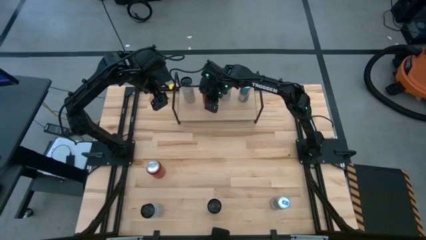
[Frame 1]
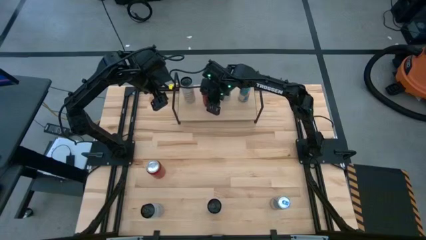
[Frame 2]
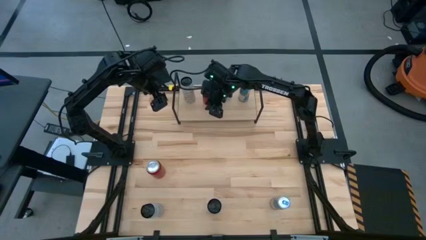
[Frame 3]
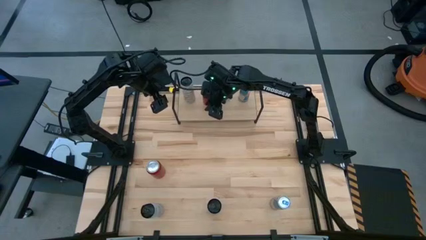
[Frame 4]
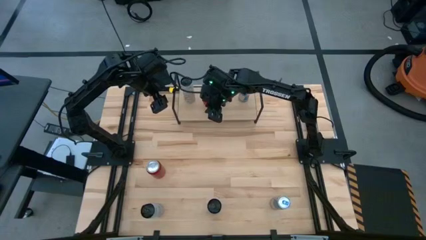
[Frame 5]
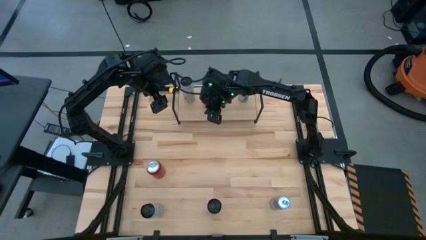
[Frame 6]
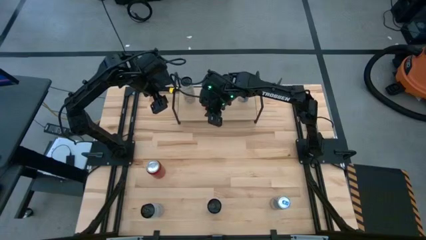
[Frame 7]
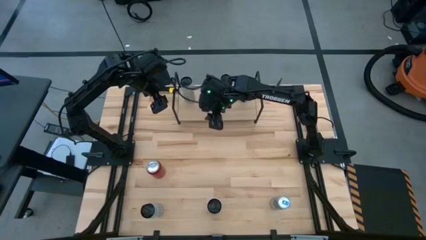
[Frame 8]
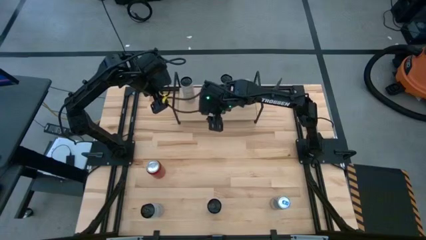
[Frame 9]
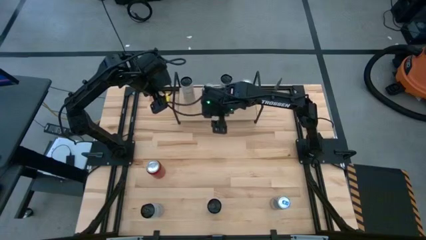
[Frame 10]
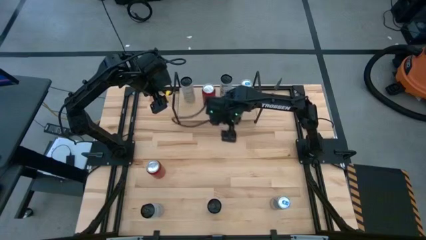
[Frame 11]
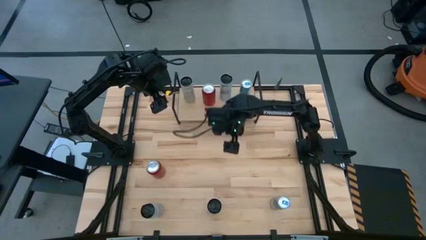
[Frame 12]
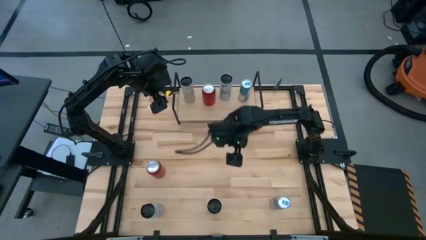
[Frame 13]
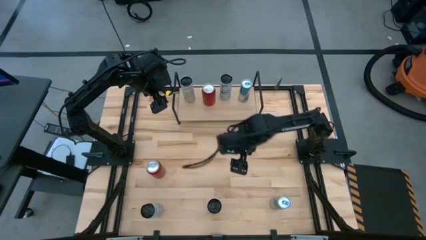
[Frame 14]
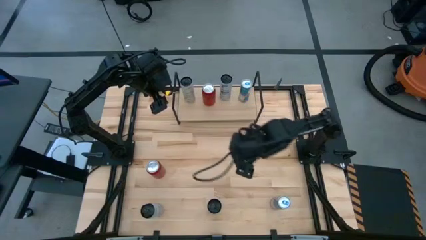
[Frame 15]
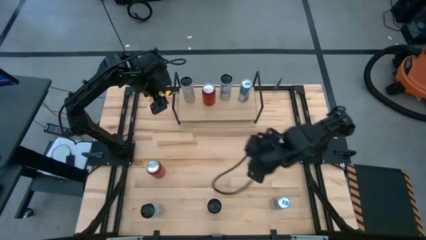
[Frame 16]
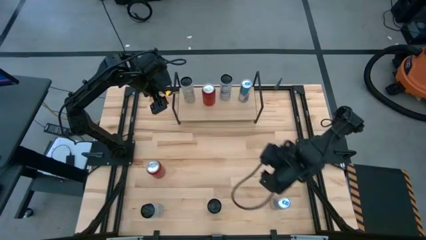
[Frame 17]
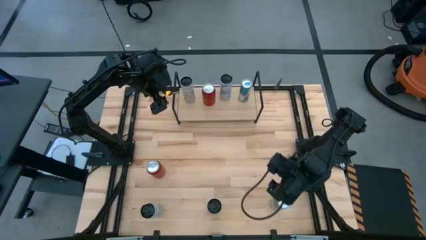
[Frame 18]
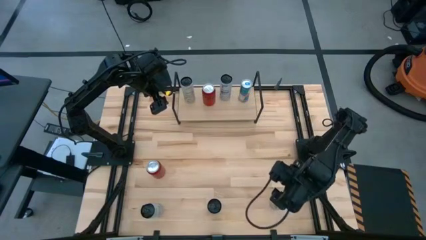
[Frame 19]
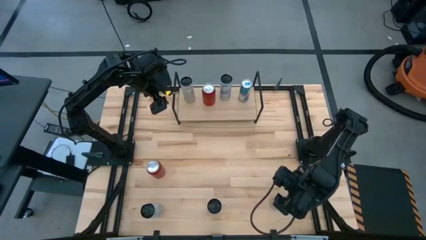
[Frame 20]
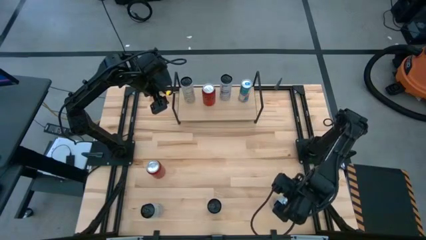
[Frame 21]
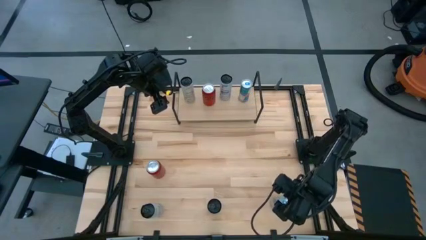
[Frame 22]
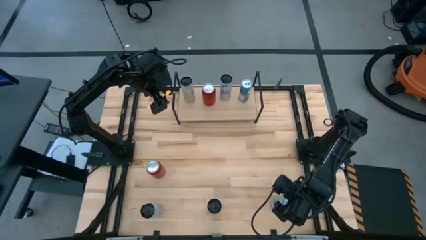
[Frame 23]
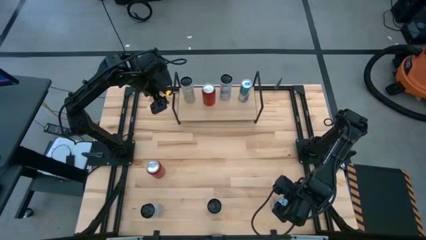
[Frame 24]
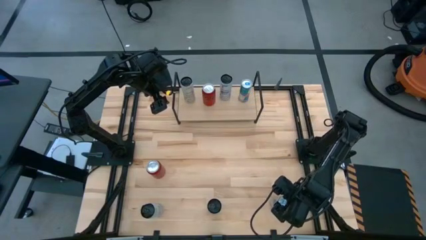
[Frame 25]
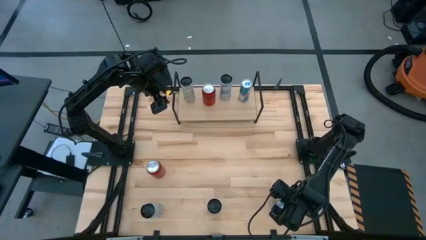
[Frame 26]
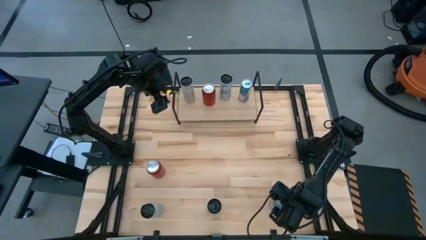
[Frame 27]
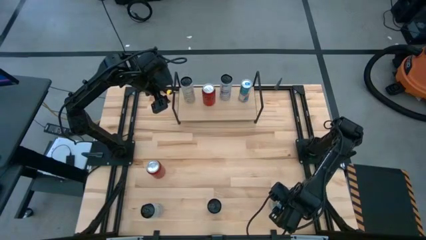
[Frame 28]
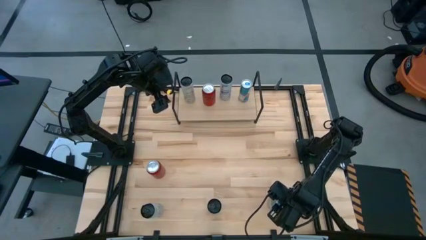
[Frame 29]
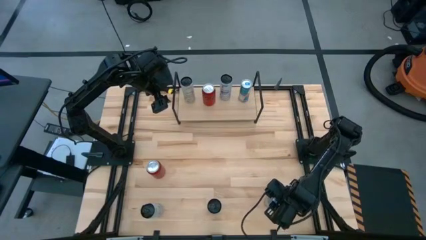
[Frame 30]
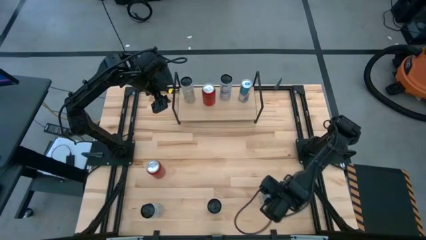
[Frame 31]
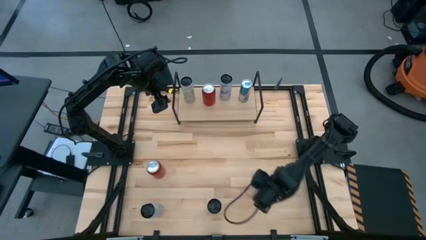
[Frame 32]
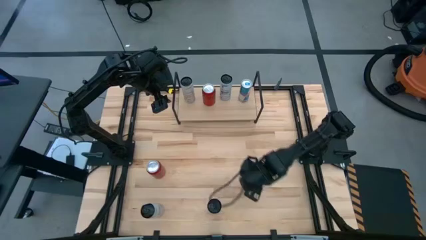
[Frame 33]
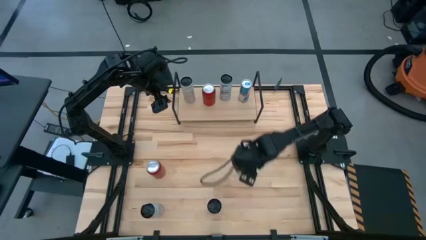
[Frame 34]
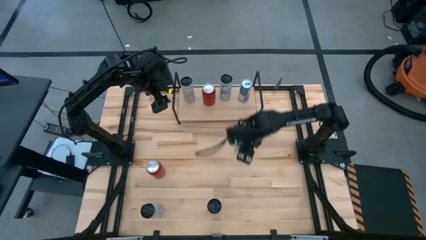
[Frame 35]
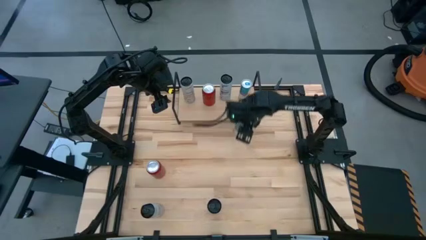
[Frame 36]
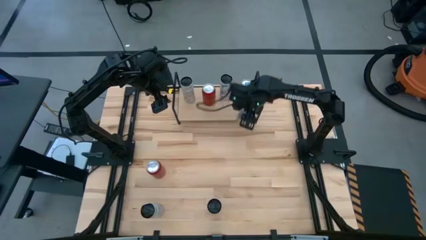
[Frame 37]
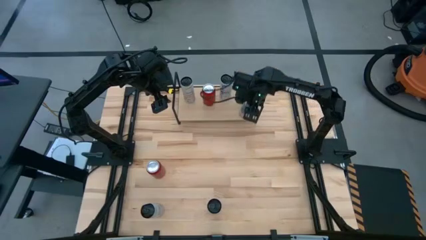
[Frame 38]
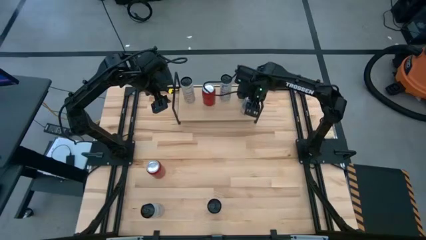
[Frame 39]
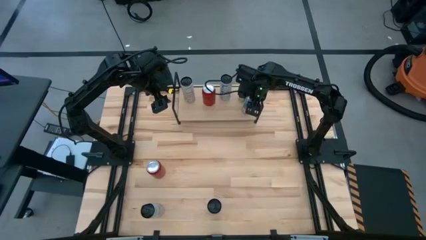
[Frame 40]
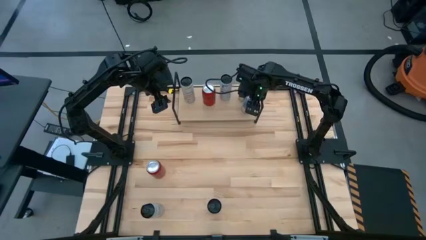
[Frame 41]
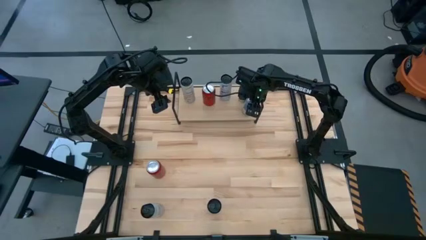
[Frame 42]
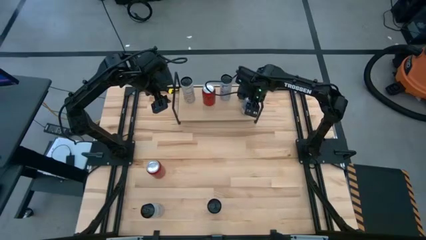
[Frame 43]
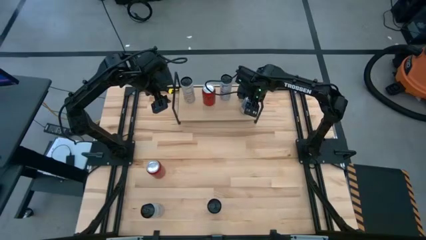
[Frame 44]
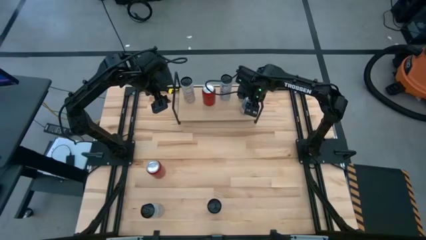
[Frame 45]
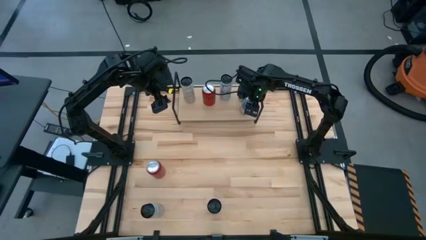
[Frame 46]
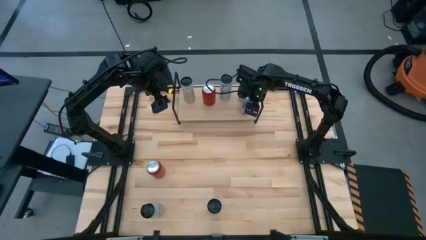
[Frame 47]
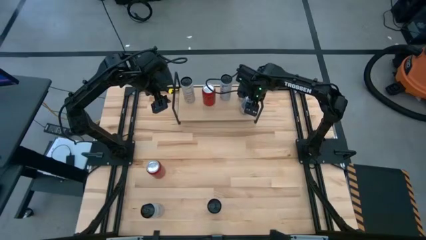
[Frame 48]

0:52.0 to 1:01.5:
Task: Place canned beverage on shelf
Put the blue soda can on the shelf

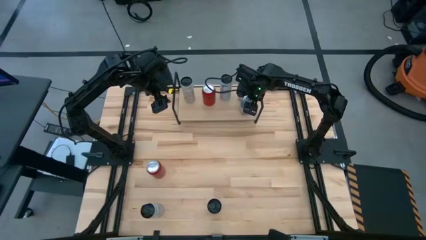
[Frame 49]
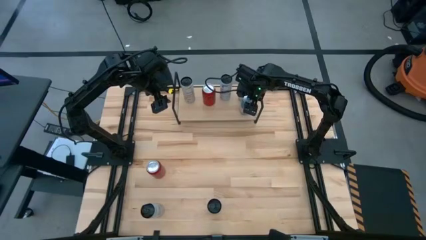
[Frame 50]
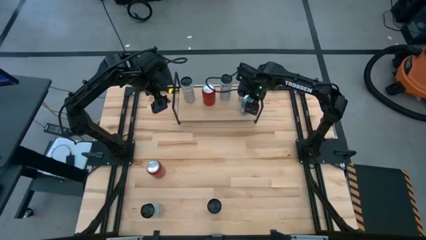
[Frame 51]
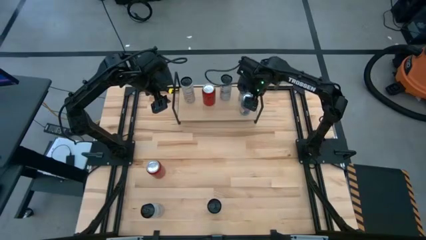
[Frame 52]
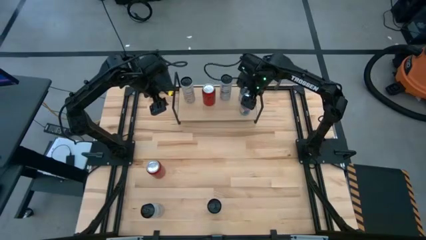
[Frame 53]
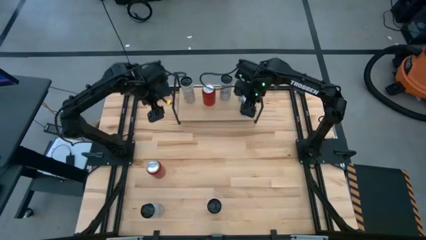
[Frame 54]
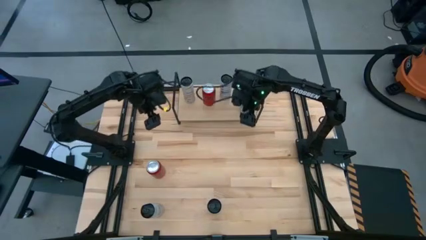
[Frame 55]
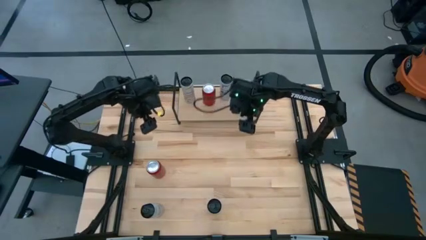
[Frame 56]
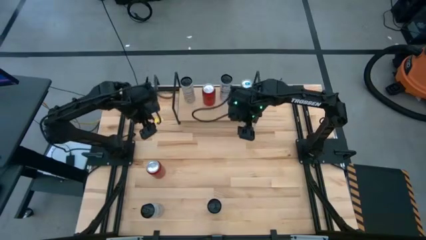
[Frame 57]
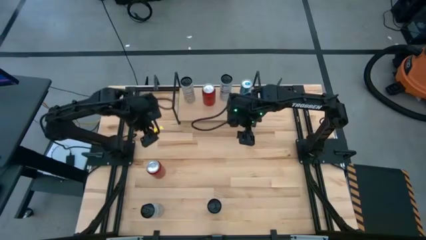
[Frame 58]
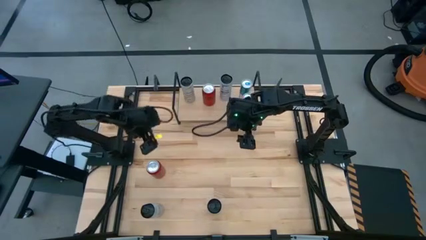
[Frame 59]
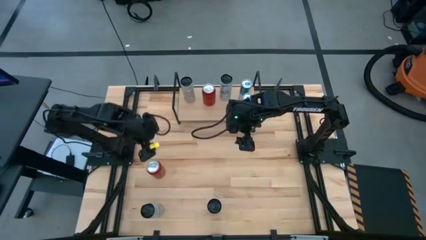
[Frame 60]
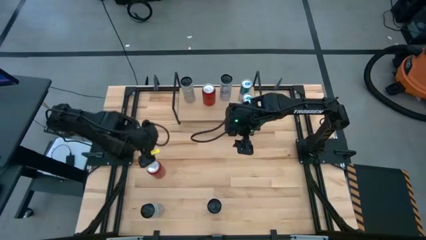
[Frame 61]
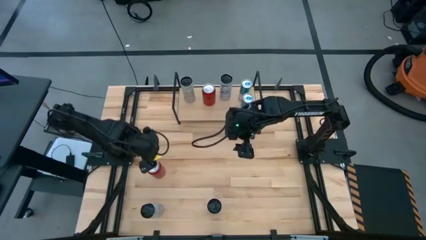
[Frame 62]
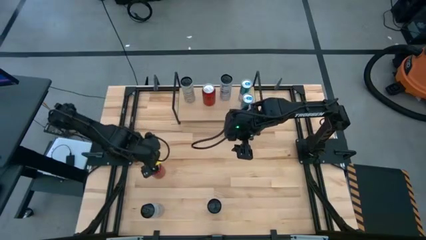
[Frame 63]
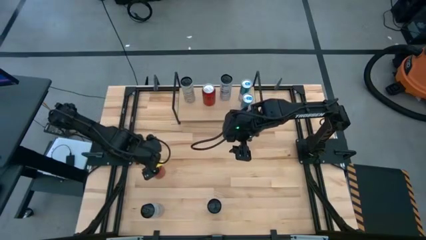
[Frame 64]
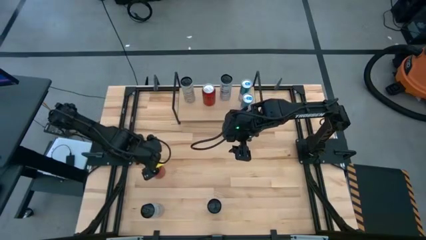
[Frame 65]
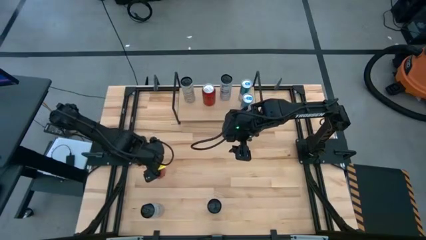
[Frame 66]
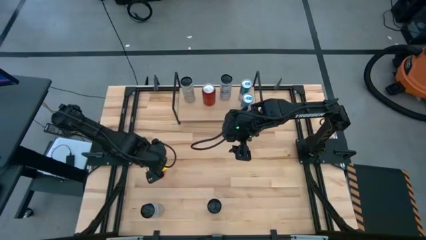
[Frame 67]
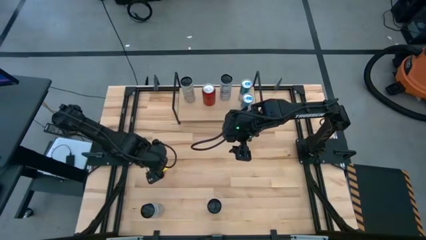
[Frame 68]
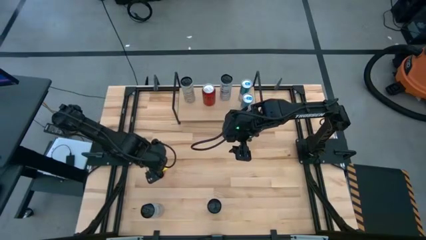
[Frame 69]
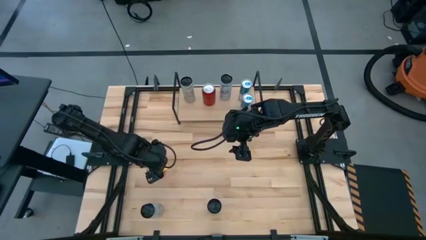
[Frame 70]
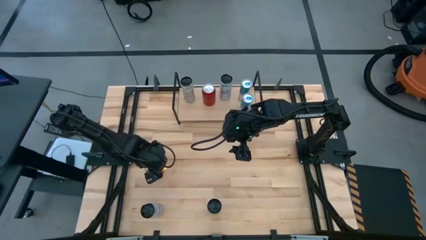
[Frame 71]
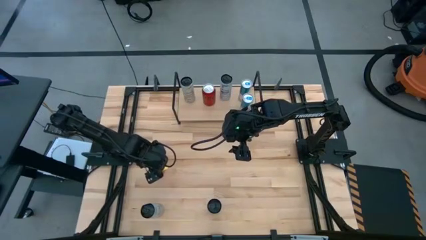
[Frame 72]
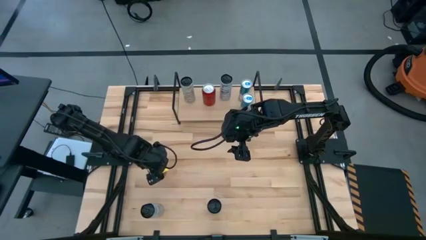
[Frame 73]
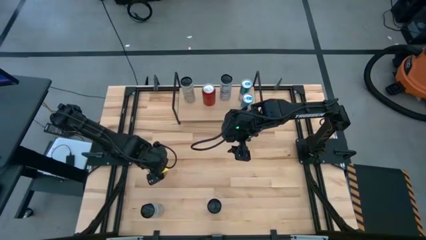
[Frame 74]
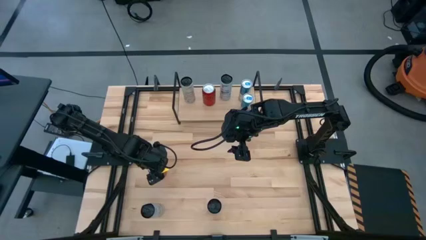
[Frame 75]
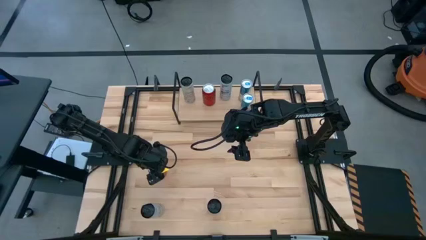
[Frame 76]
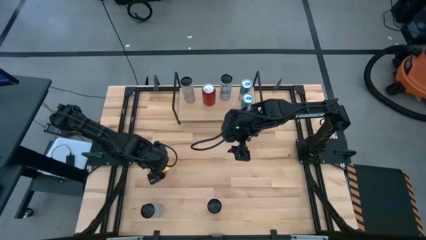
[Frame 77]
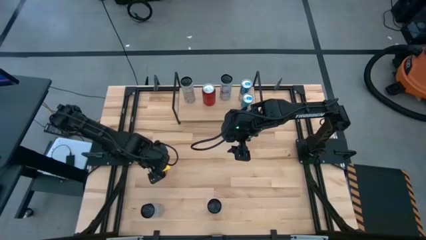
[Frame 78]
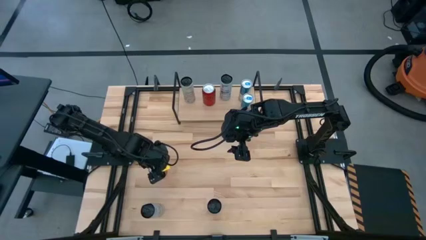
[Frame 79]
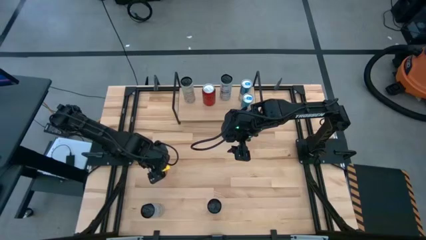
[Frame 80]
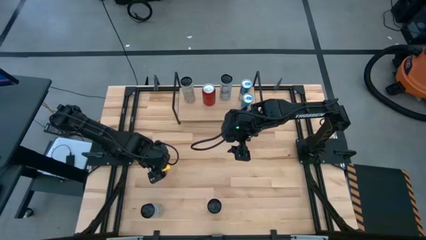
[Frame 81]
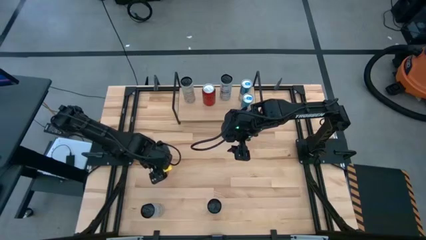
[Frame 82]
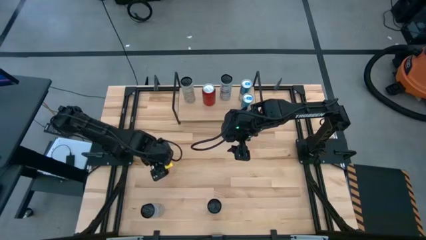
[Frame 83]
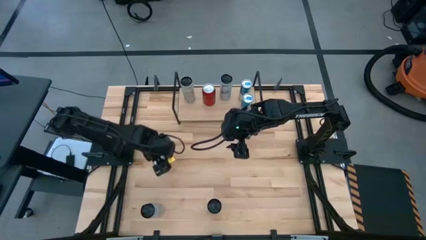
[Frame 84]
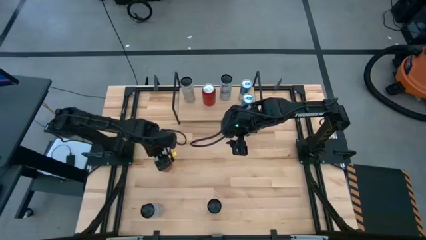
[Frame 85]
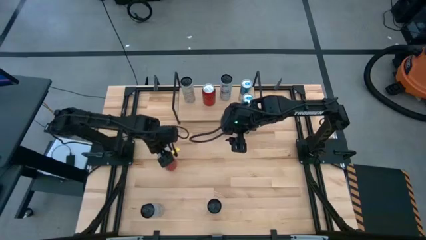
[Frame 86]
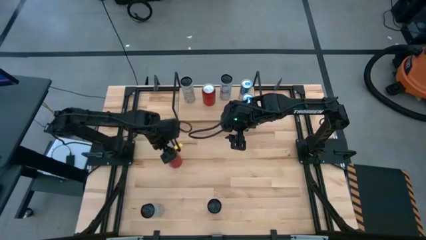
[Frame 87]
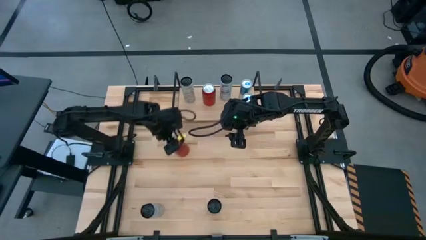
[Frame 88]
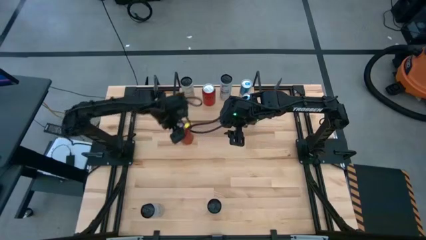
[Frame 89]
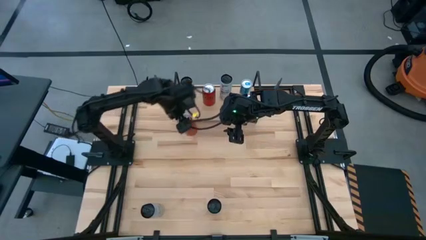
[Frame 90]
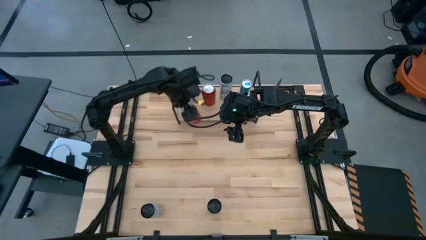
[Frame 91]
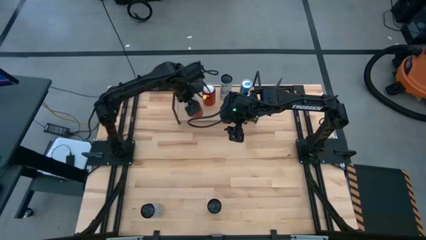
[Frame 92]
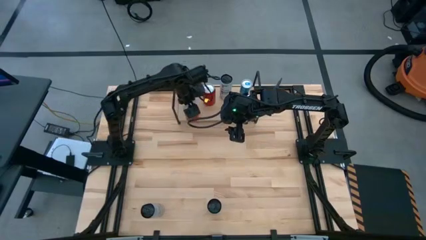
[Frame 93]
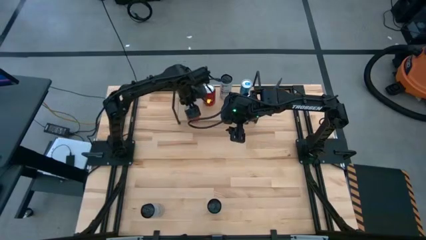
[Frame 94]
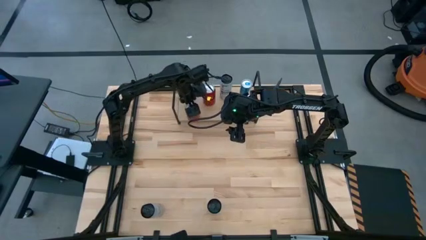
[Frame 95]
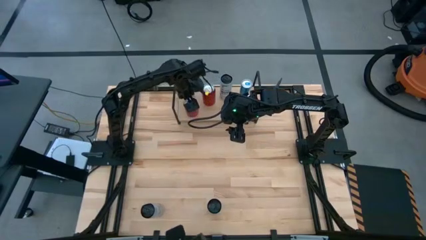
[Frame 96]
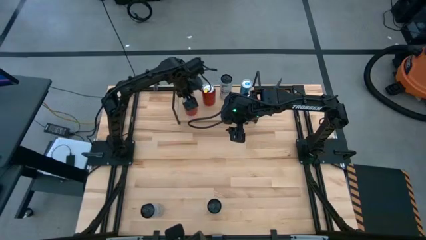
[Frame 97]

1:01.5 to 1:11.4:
Put the red soda can on the shelf
